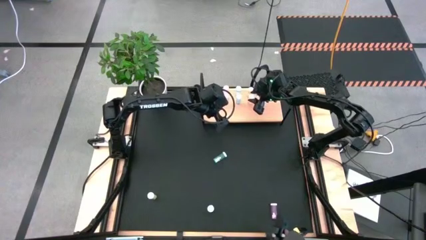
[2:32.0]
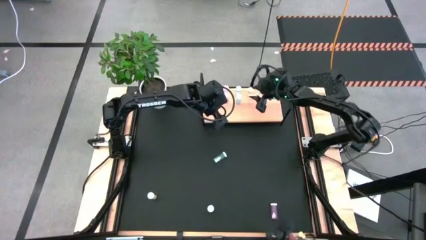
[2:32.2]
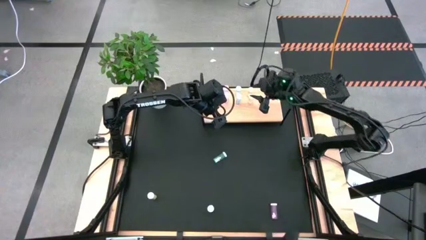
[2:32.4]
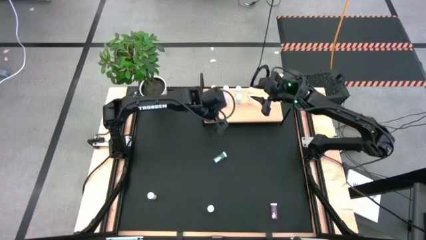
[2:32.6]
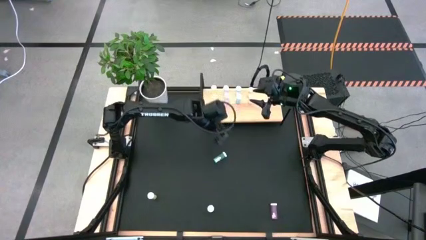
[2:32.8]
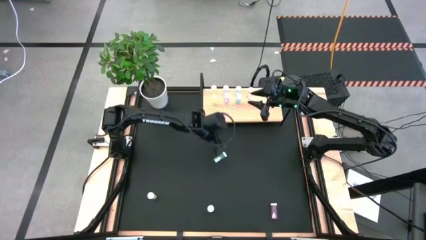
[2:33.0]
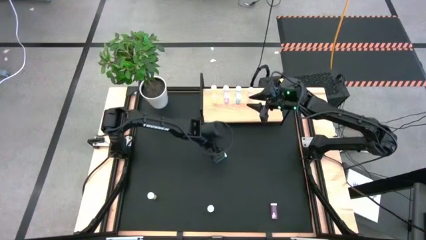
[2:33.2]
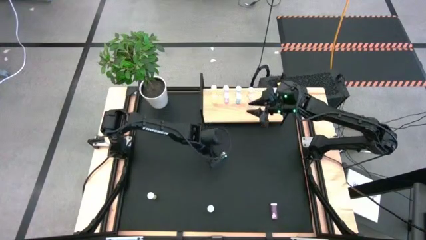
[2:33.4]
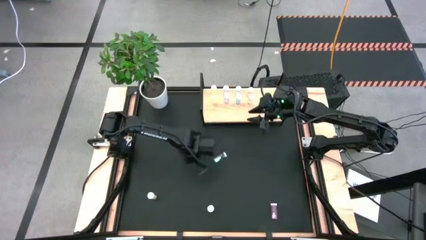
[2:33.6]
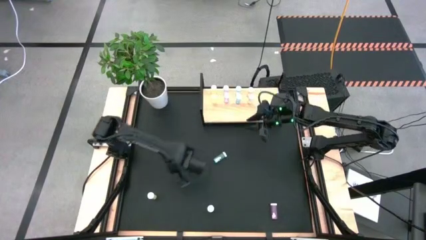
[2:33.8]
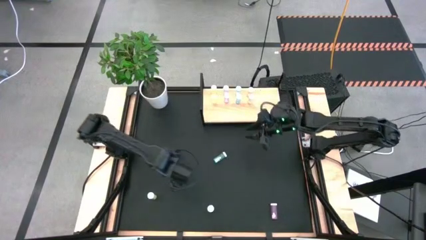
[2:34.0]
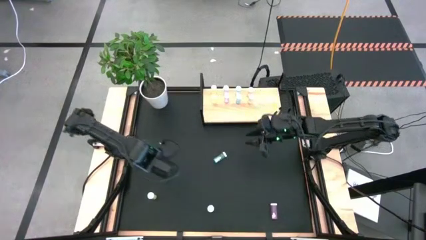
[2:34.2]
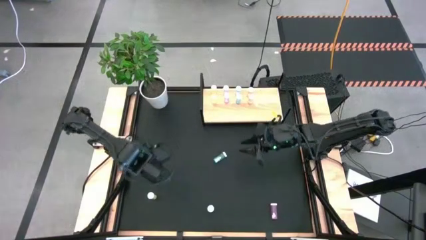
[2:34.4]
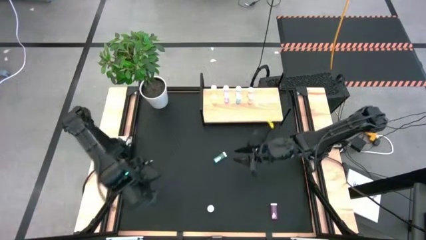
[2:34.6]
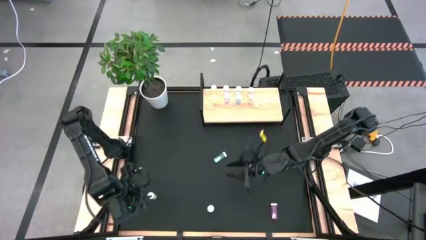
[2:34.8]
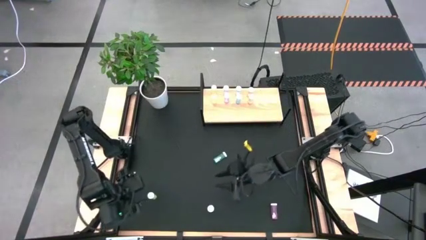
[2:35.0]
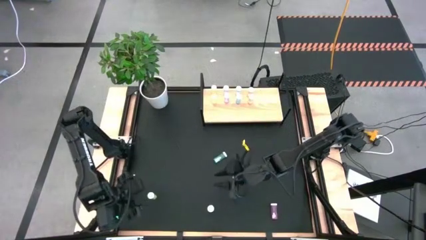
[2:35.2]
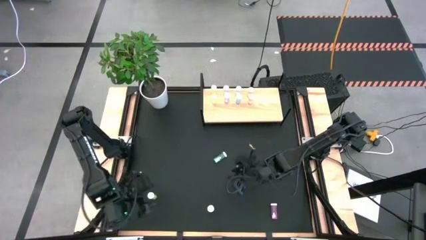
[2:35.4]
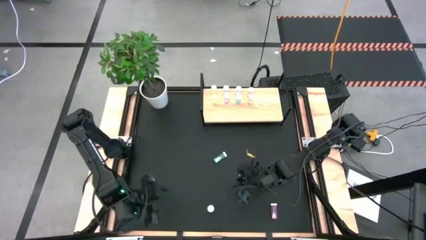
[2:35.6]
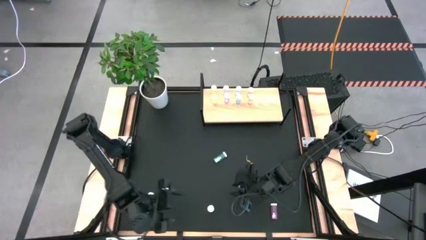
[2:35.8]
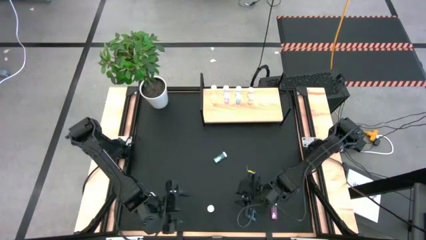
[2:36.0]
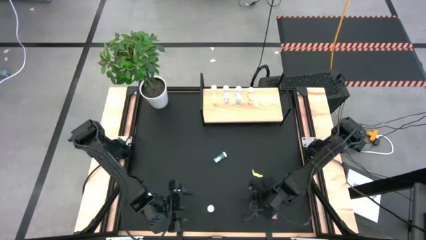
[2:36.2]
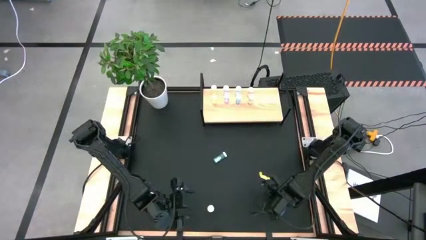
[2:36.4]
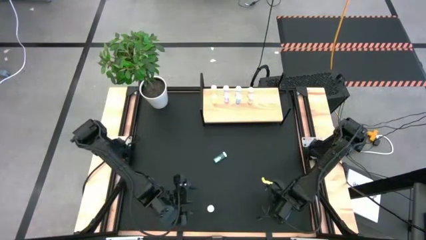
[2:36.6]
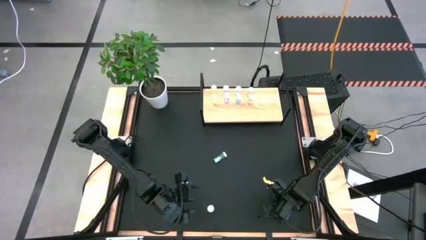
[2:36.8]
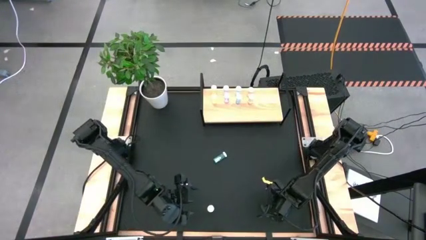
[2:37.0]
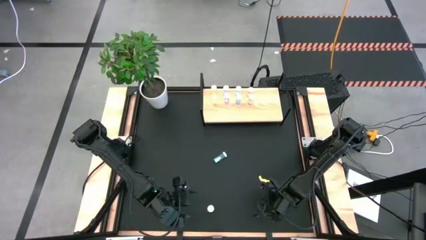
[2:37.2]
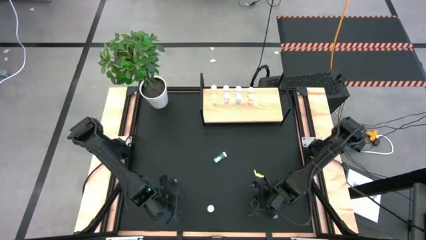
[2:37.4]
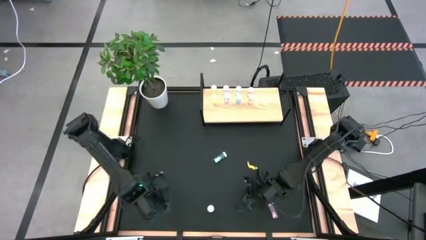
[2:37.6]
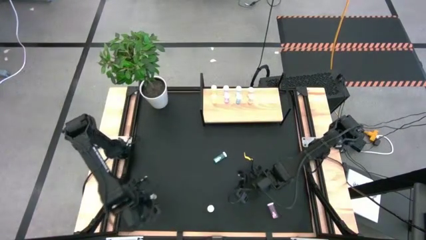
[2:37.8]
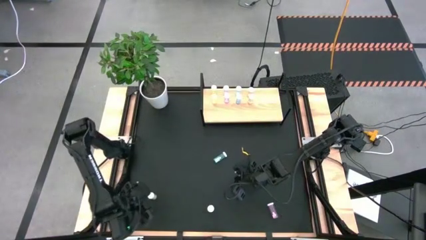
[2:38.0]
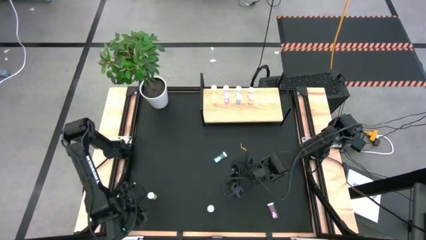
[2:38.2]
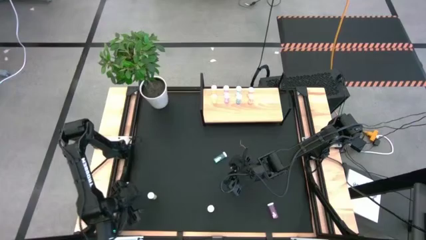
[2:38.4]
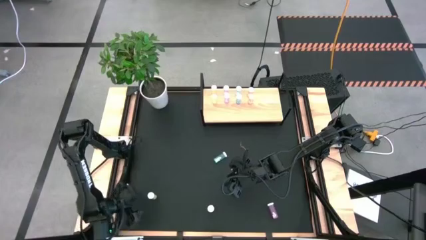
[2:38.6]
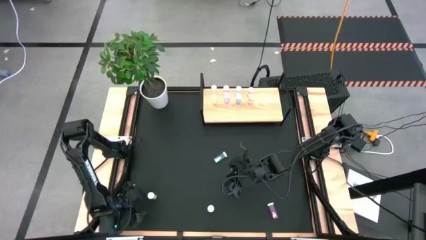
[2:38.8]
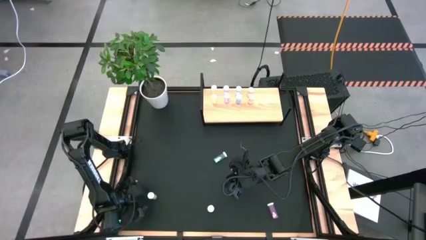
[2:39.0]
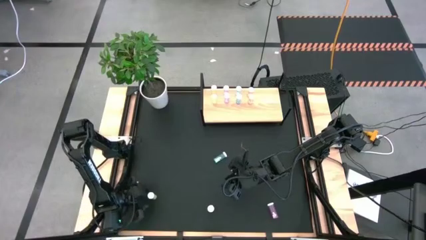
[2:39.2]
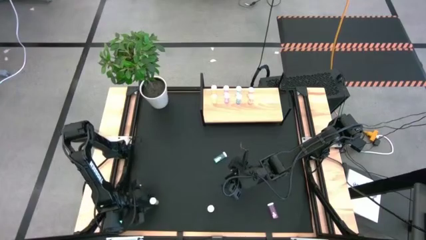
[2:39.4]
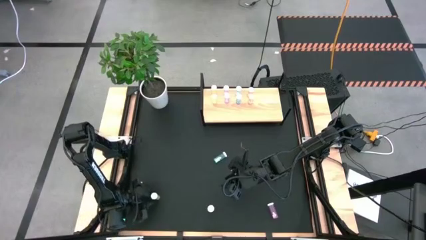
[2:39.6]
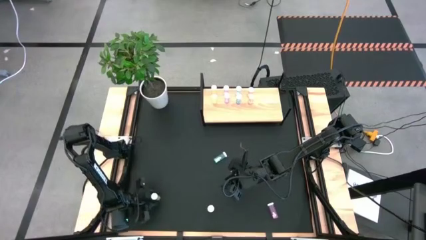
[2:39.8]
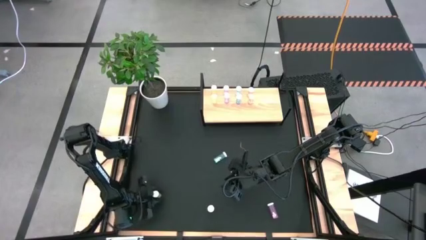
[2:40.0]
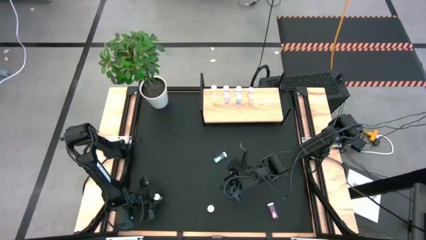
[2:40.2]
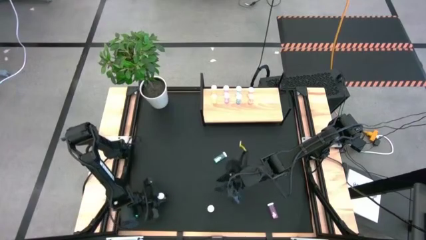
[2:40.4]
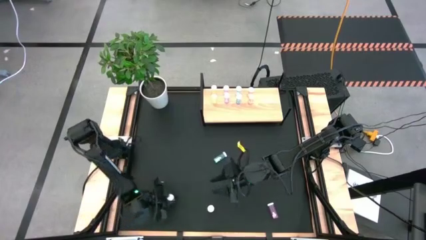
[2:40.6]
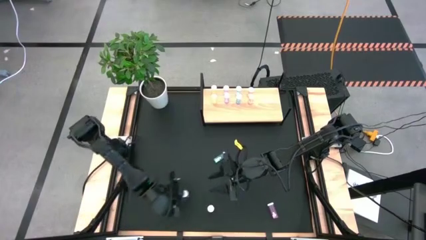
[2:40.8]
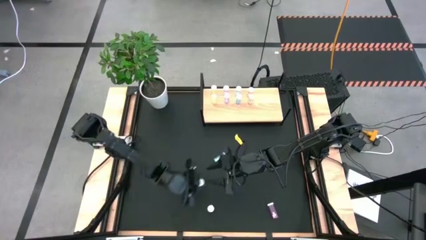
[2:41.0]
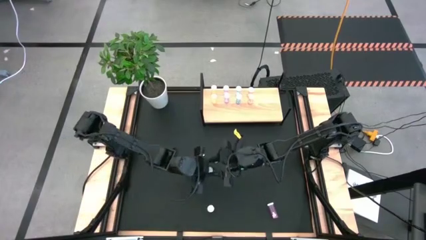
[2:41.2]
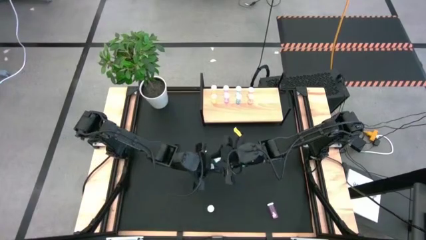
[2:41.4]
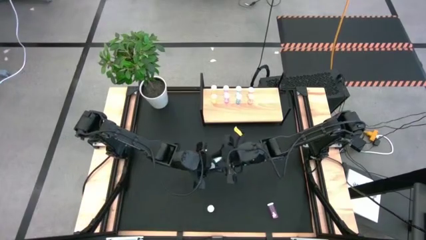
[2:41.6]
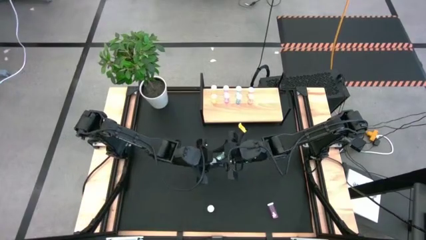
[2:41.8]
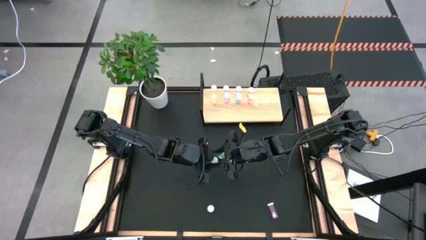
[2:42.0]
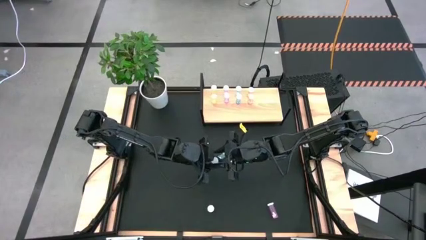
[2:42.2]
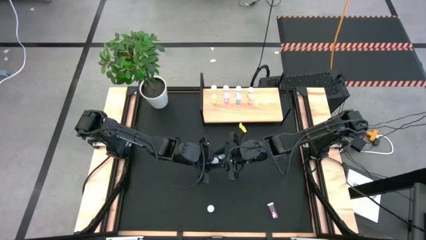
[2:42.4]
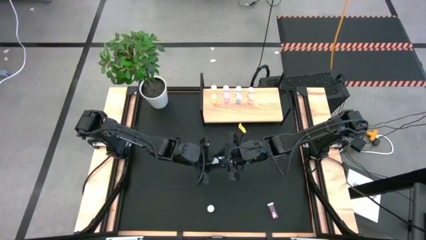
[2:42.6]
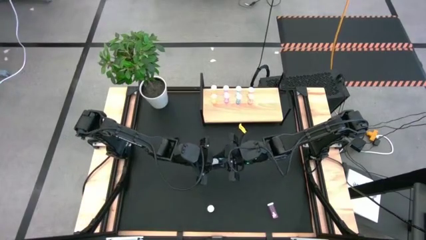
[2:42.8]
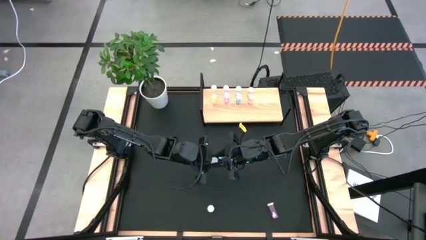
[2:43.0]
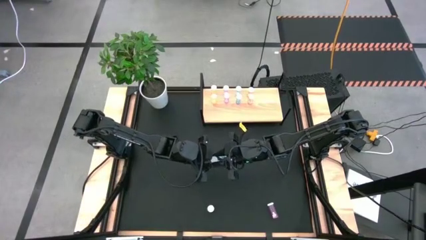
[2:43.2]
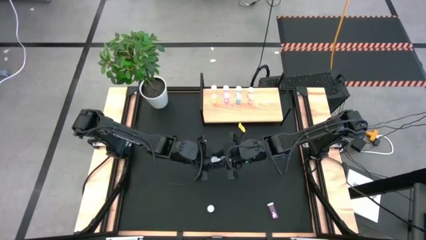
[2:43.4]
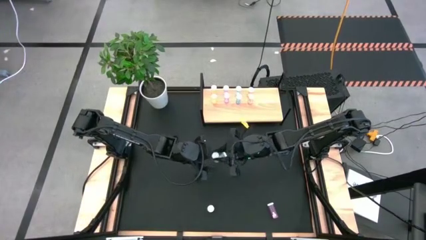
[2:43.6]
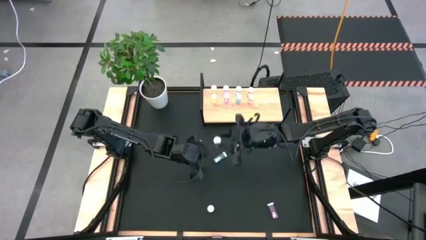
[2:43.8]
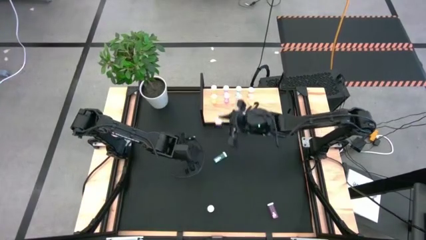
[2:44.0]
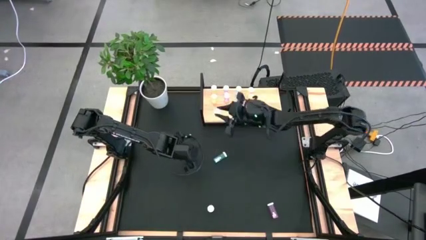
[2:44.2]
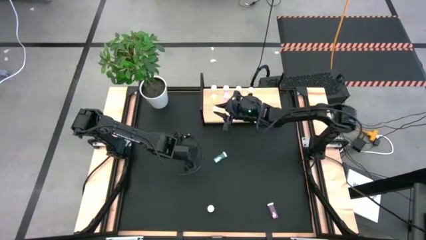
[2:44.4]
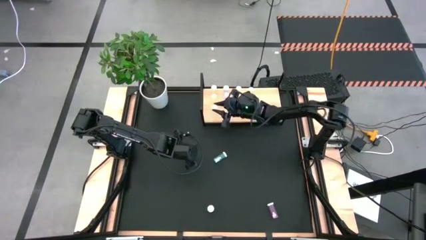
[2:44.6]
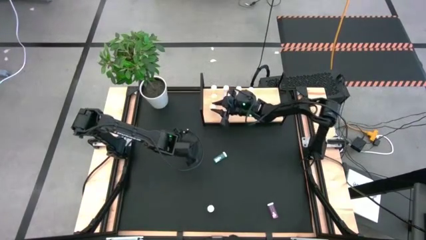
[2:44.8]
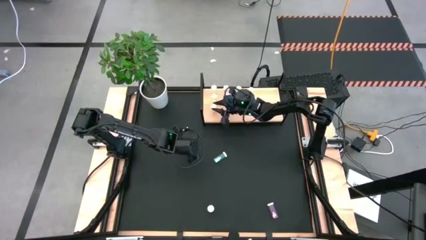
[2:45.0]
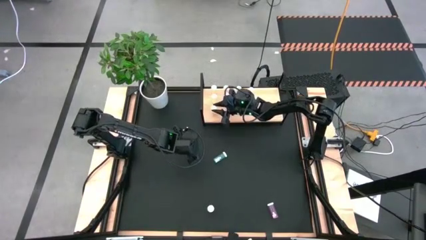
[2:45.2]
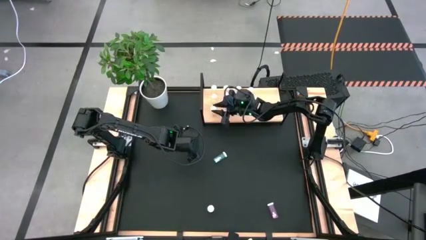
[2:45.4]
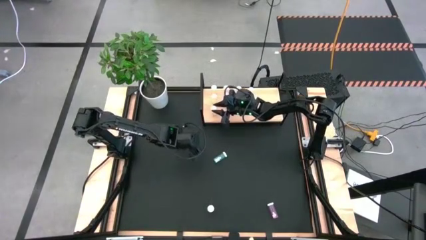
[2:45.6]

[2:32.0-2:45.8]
Task: Pick and place medicine bottles onto shelf by color
Put the orange pill bottle on the shelf aligned with the other orange pill bottles

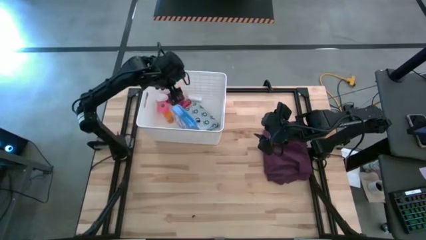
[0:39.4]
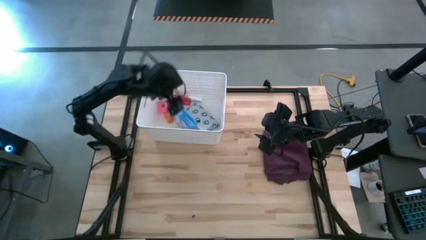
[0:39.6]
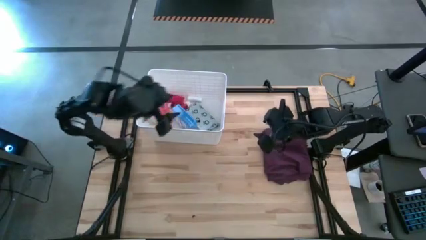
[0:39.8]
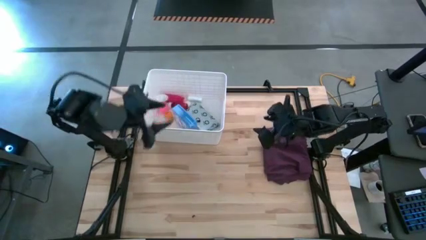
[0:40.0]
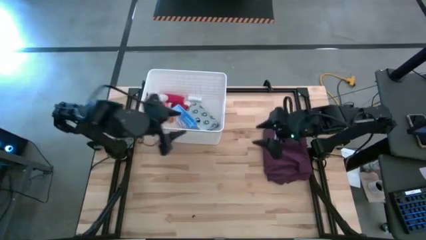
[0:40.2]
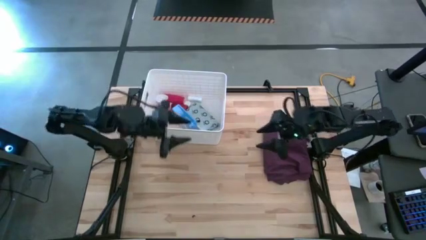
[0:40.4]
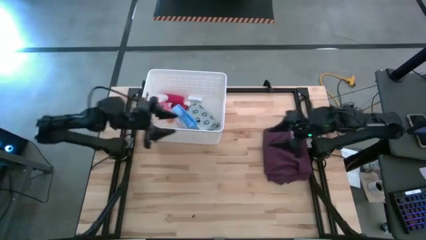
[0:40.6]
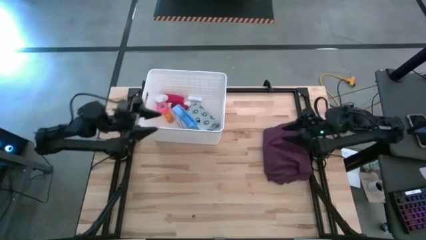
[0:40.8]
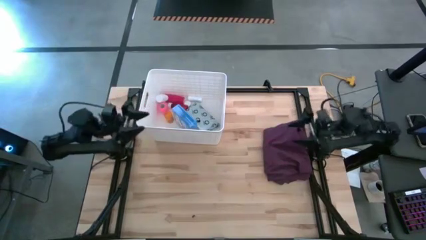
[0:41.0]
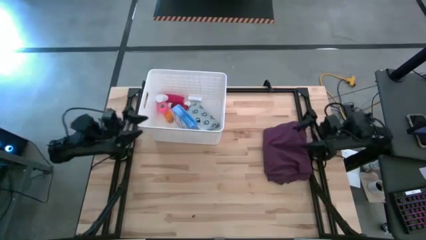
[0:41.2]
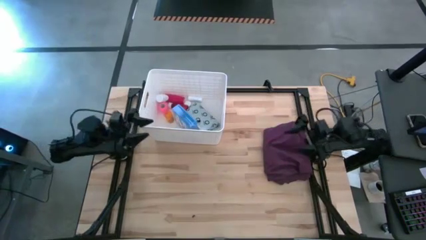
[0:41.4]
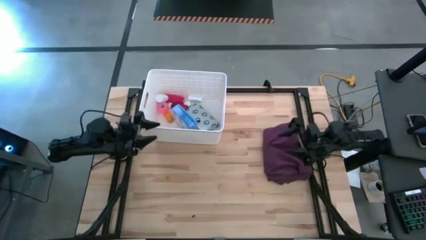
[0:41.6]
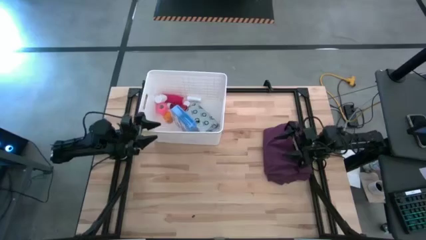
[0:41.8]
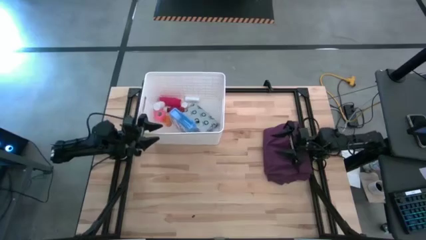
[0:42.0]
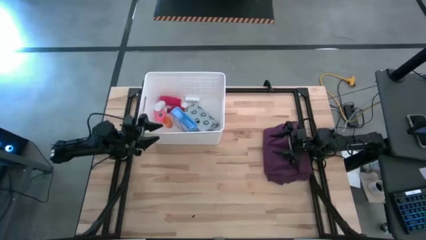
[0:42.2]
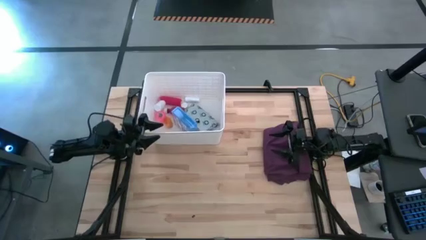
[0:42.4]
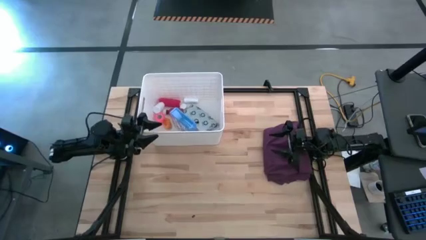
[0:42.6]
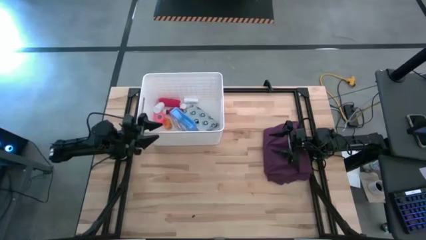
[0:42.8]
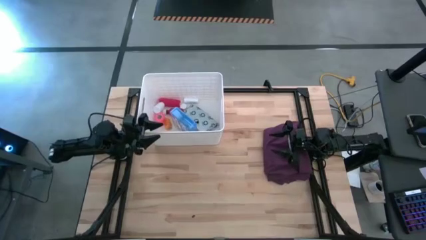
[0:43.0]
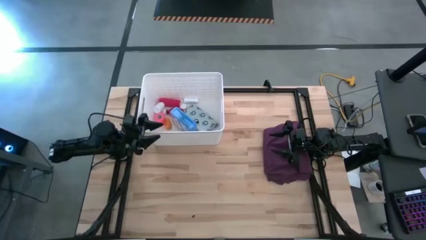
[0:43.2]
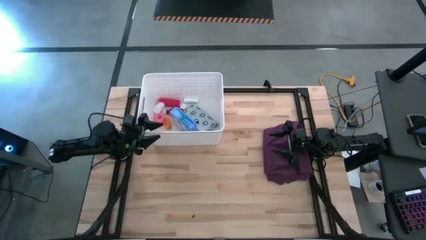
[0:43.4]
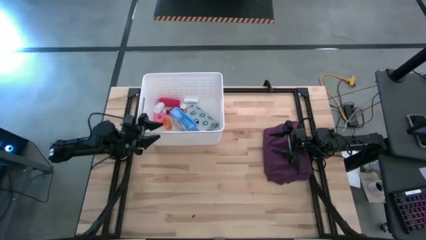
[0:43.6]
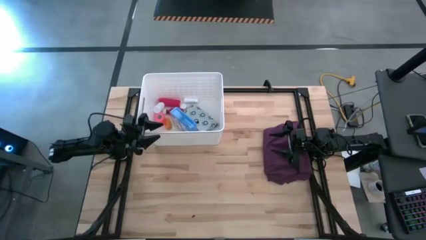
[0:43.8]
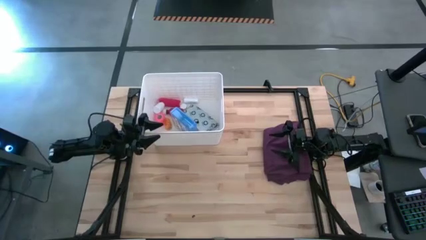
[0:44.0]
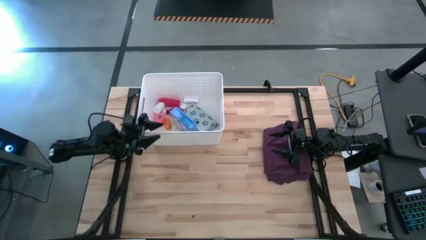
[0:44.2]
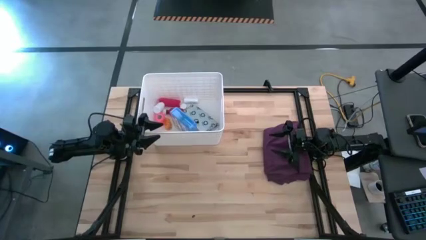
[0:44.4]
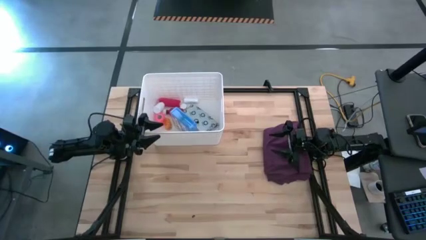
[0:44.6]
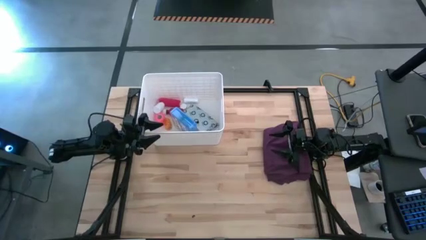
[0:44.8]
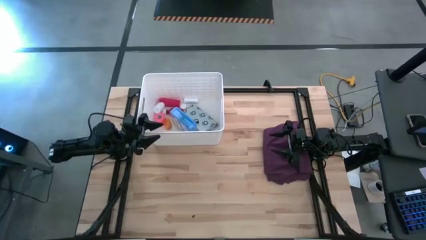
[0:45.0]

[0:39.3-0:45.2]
Task: Pick & place medical supplies in basket/bin
Return to Home Position
